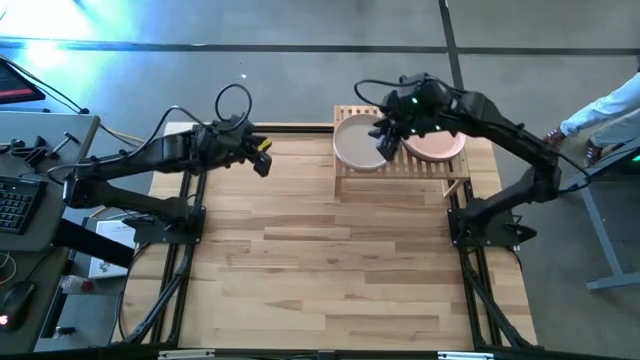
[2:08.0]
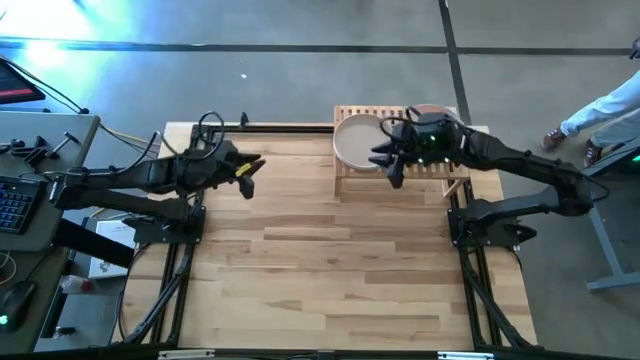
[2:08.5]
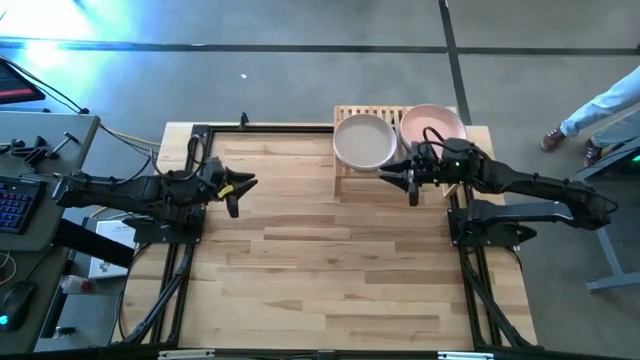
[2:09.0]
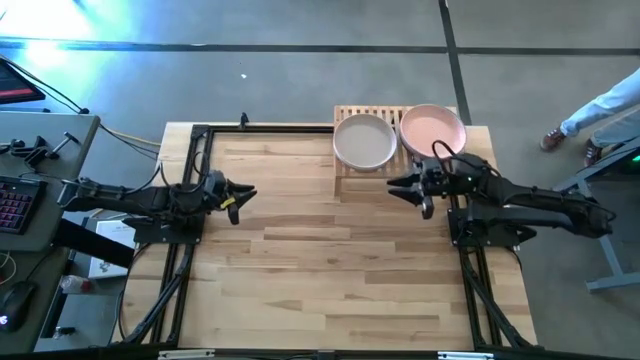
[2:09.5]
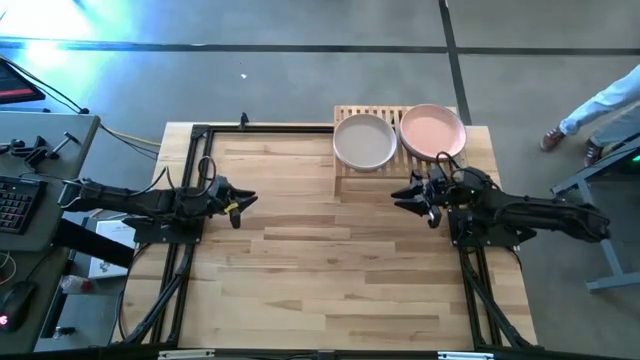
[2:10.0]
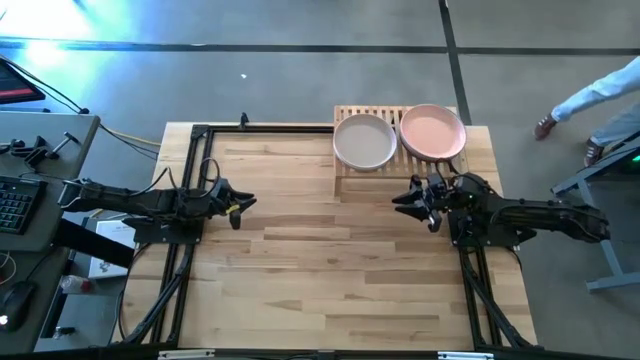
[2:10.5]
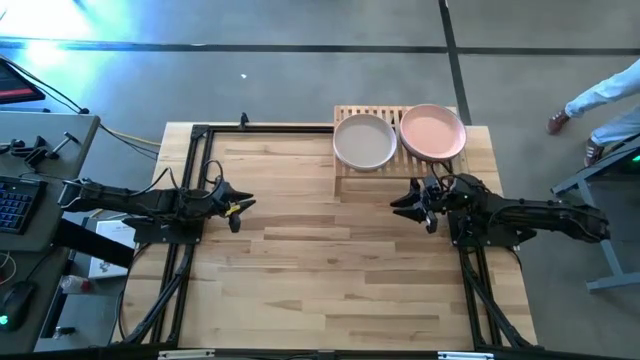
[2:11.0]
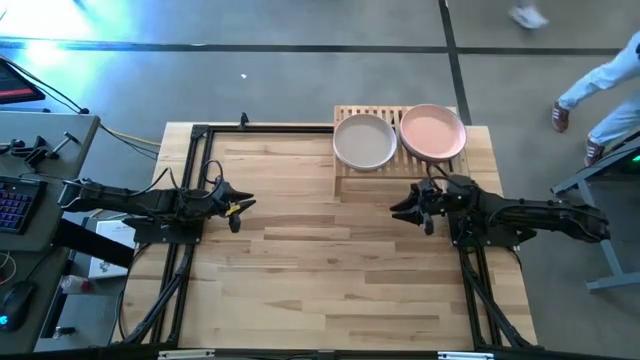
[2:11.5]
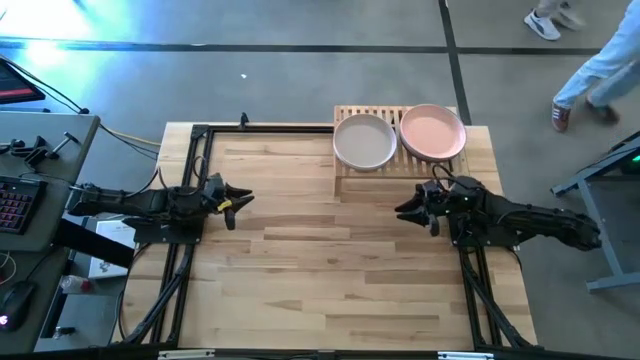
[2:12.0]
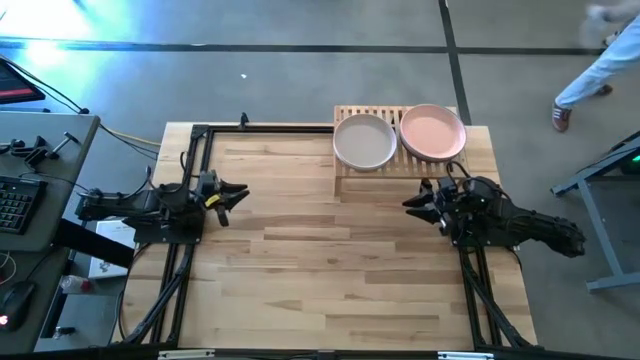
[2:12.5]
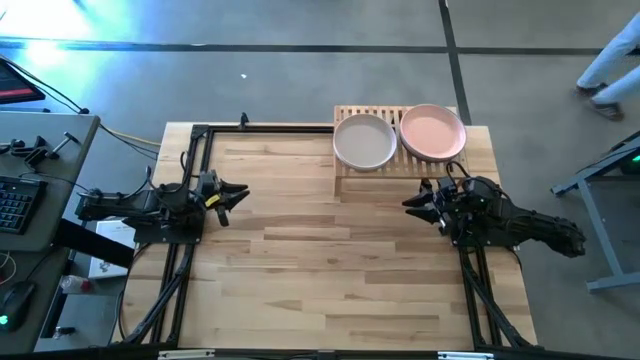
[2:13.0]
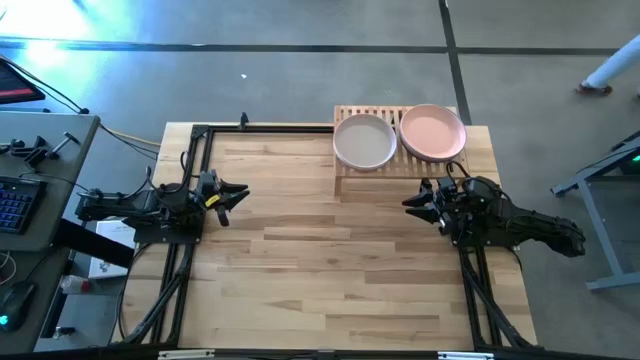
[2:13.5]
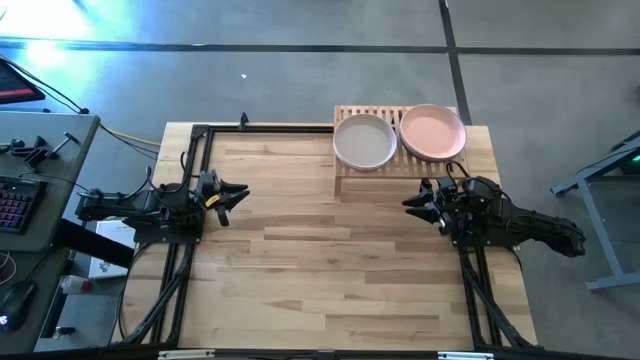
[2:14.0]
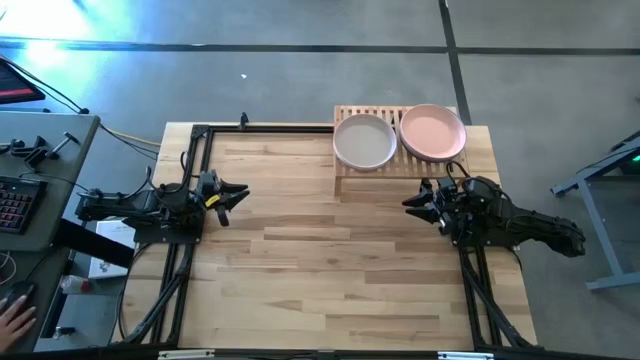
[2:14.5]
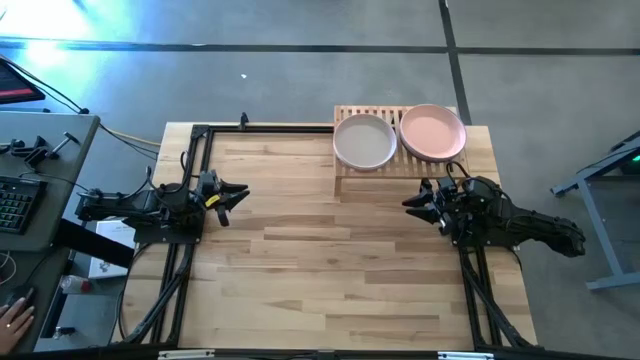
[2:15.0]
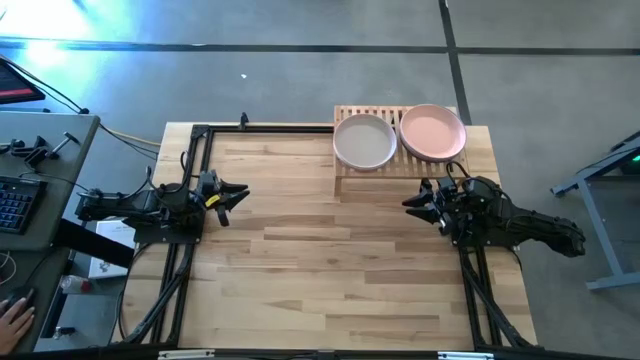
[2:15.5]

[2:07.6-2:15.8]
Task: Place and stack plates onto a shelf
Return to Home Position

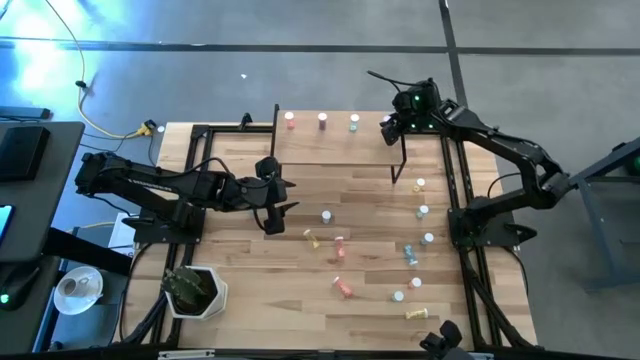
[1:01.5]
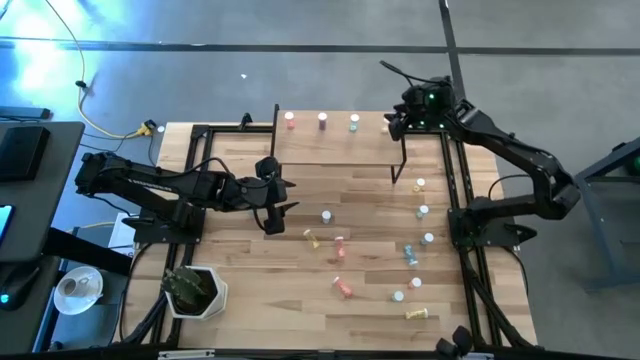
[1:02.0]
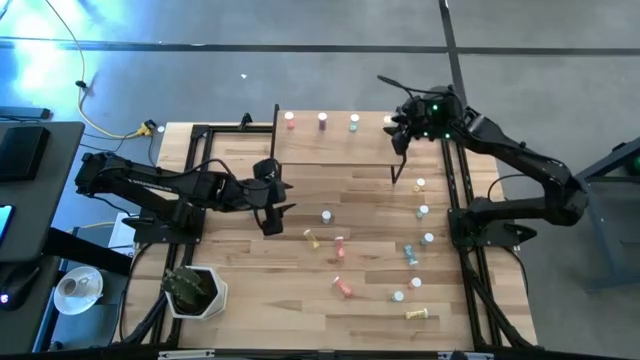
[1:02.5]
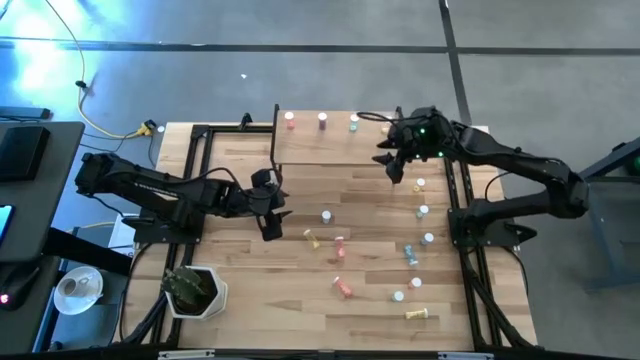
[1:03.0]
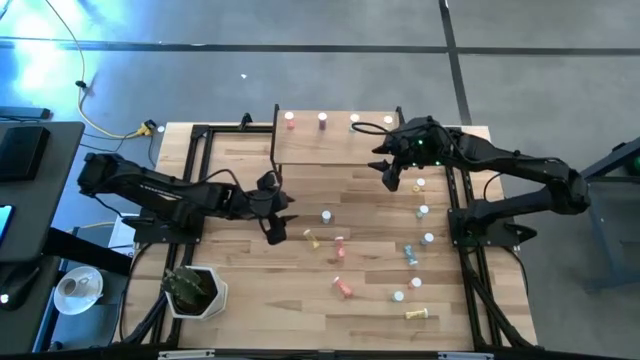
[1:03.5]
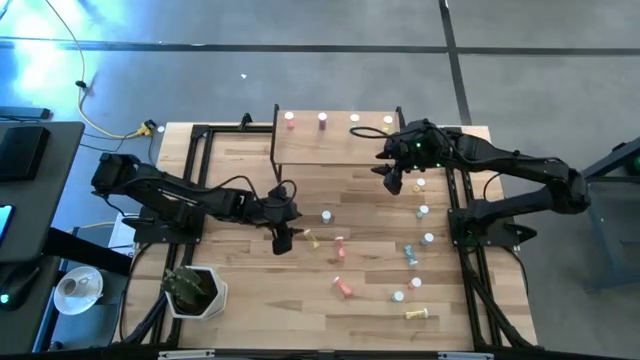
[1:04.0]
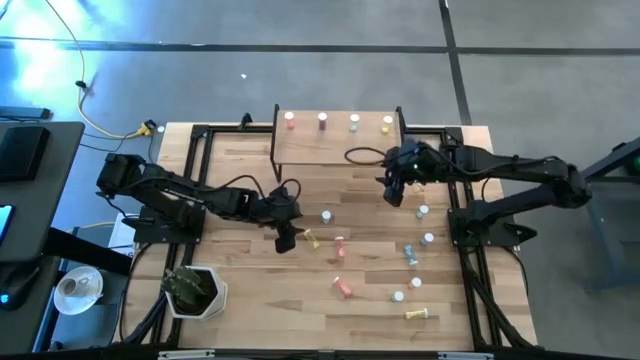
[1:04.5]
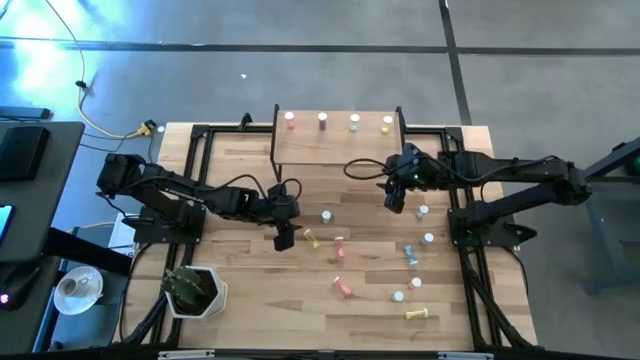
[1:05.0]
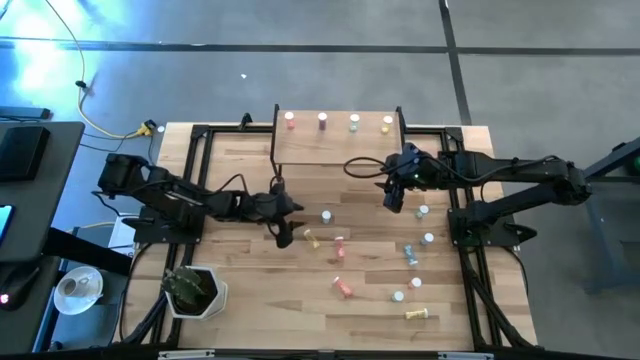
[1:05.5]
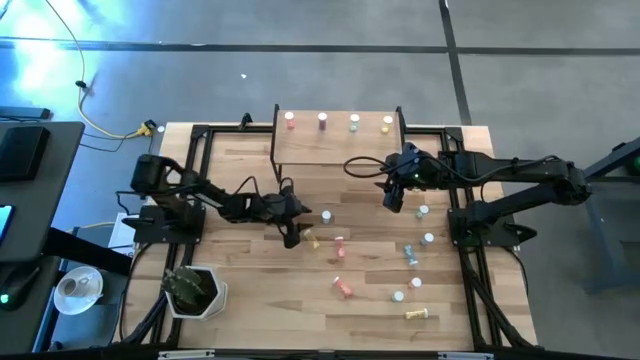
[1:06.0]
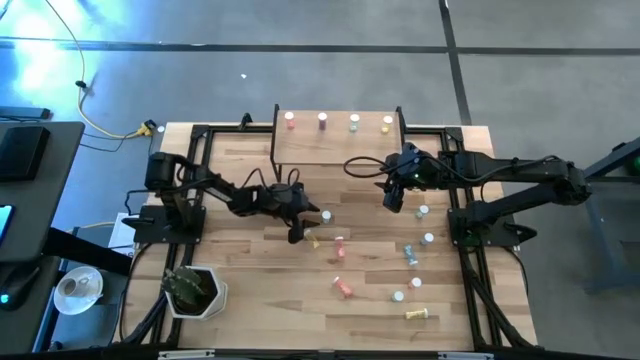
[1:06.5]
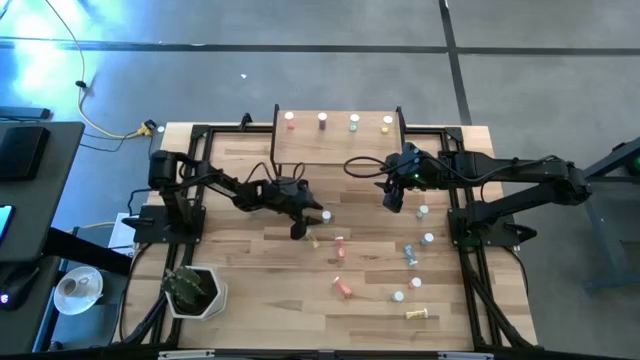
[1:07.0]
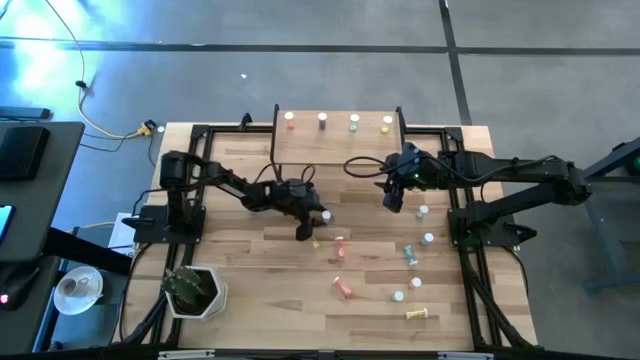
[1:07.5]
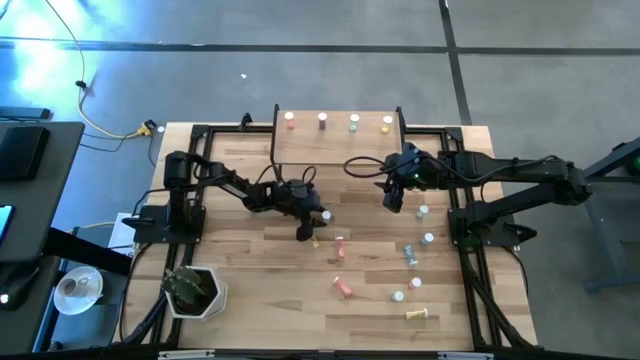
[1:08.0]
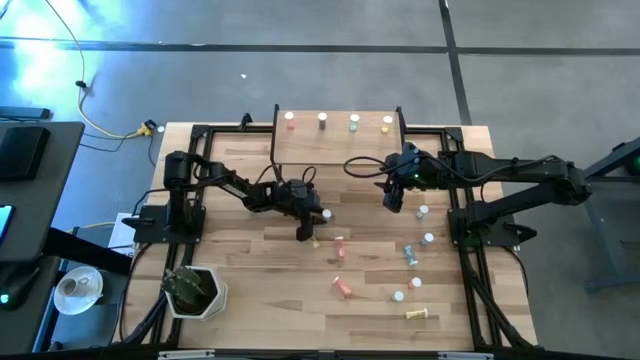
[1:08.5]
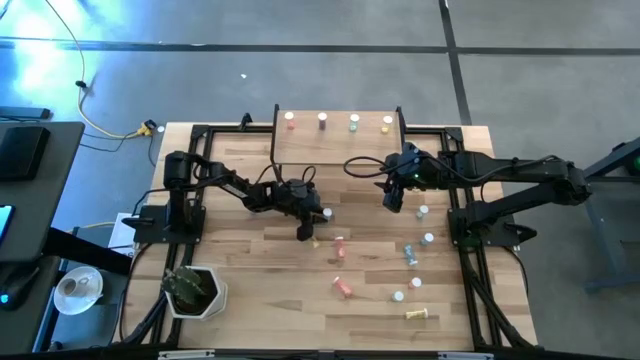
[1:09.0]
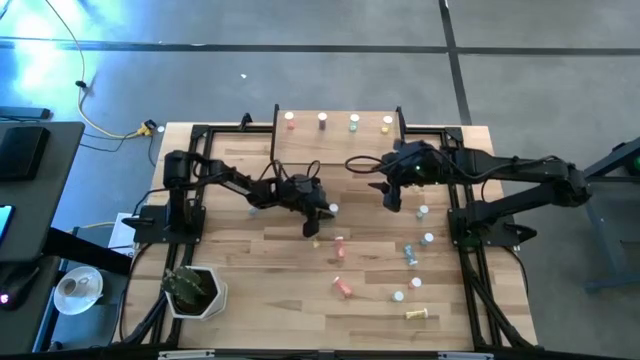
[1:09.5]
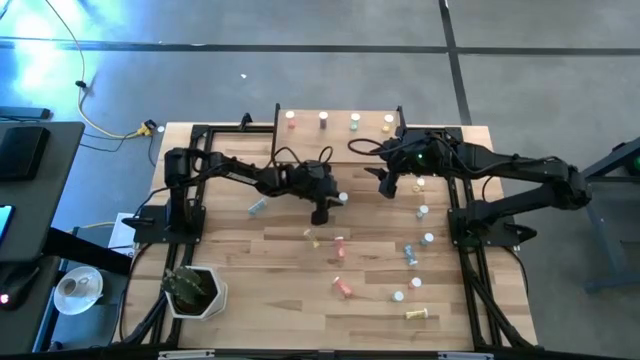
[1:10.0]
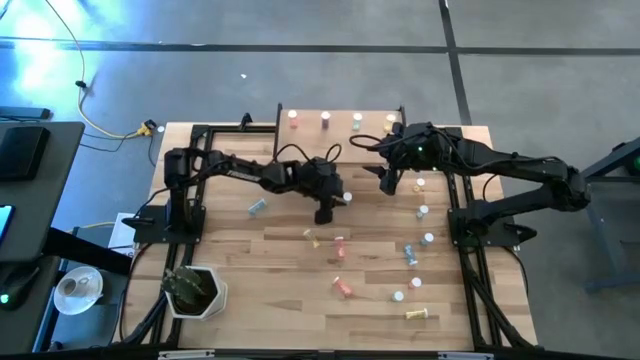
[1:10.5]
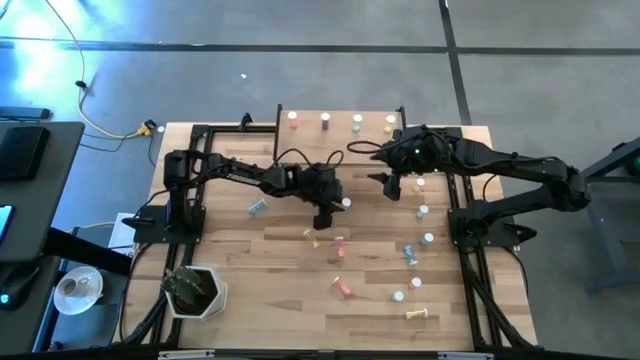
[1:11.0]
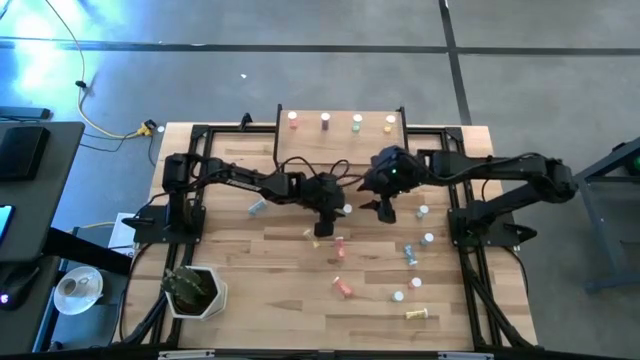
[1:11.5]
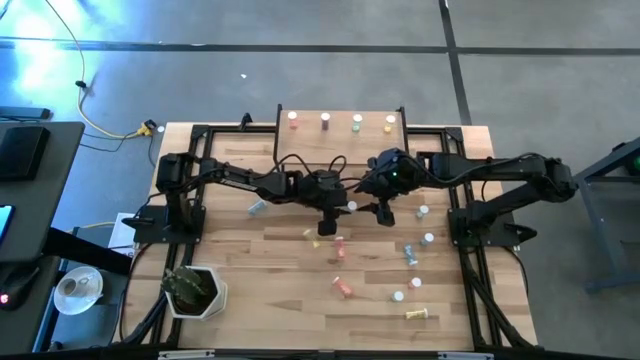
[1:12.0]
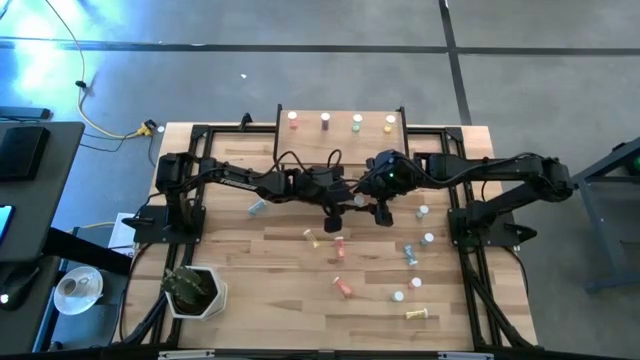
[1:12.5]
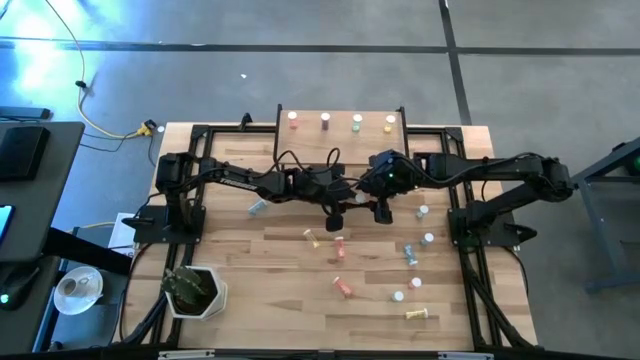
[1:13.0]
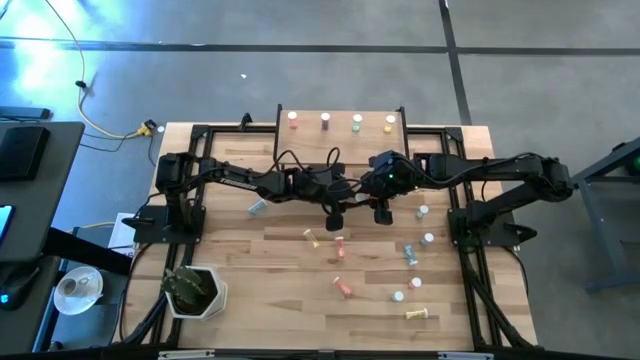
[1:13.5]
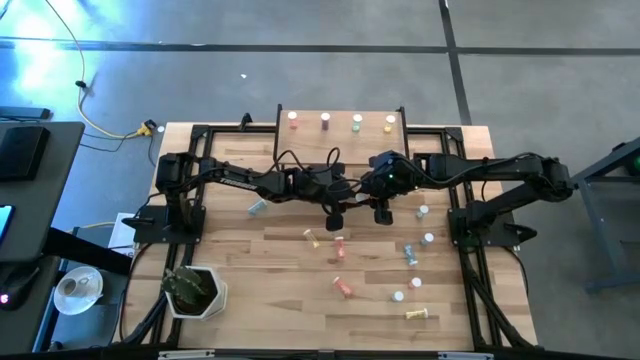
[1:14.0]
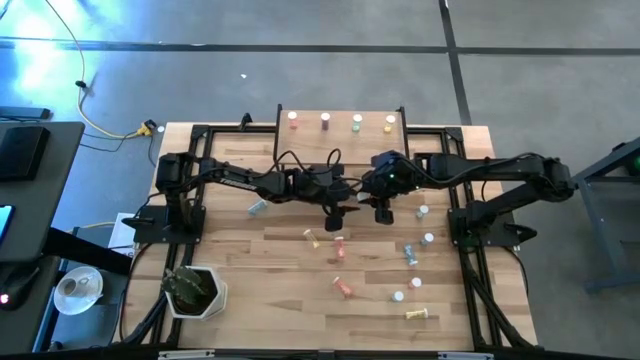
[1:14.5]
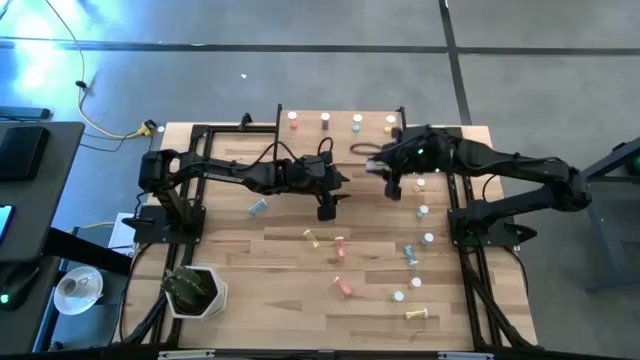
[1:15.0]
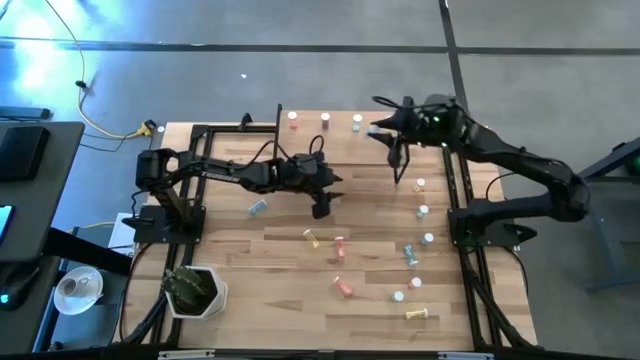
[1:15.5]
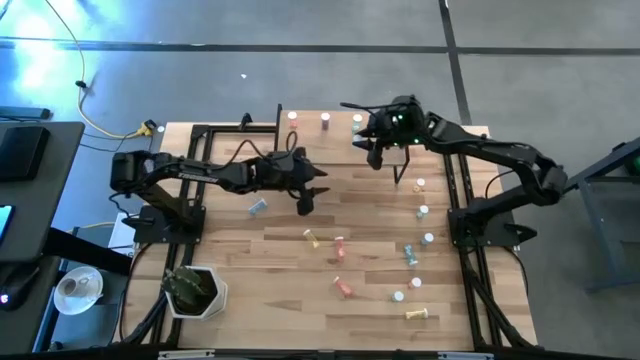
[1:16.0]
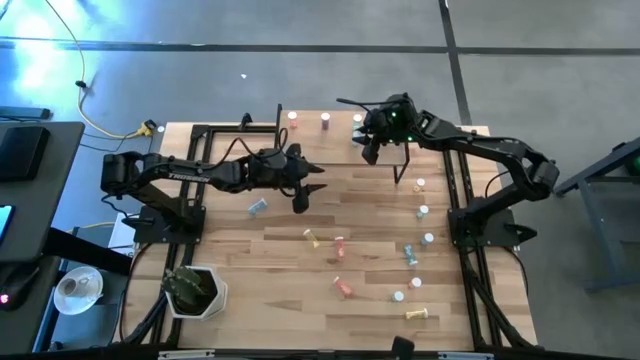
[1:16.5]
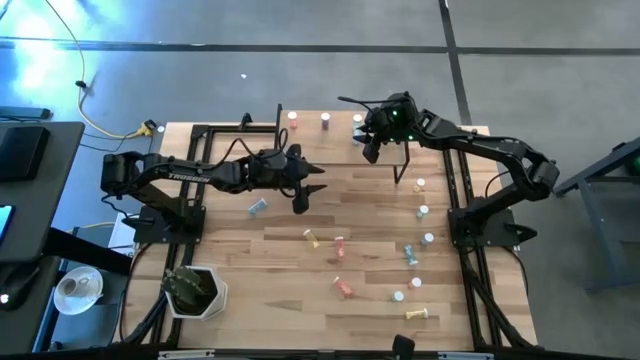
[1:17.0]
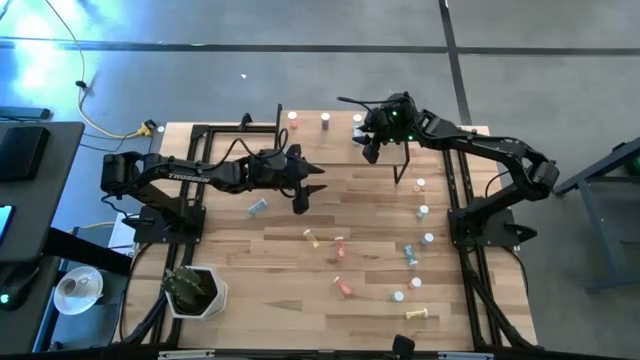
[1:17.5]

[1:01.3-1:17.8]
Task: Pick and place medicine bottles onto shelf by color
Put the green pill bottle on the shelf aligned with the other green pill bottle
